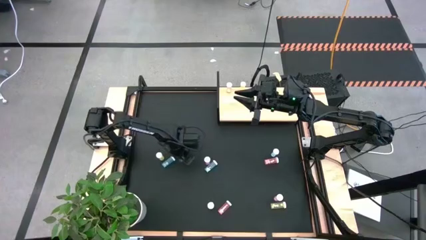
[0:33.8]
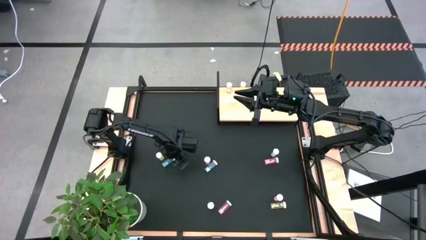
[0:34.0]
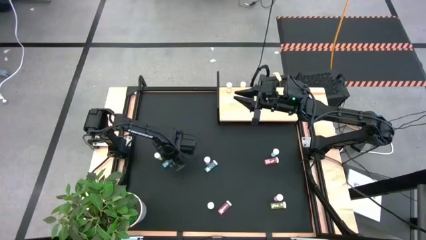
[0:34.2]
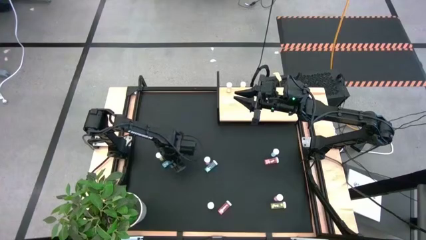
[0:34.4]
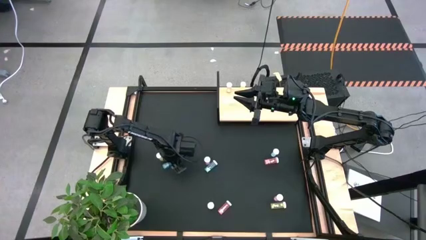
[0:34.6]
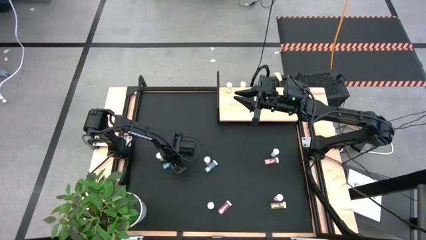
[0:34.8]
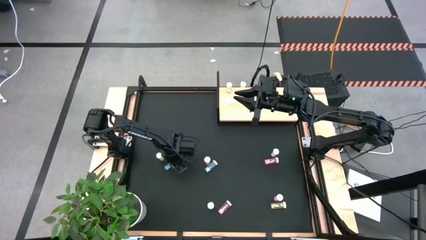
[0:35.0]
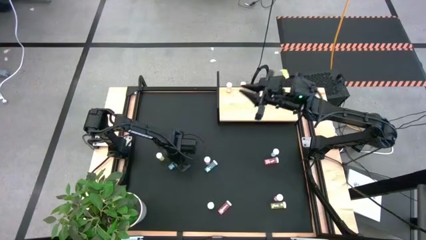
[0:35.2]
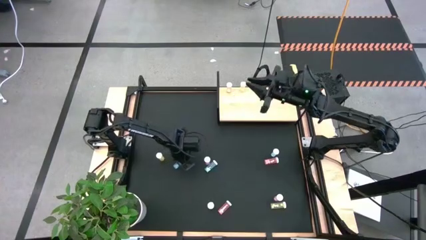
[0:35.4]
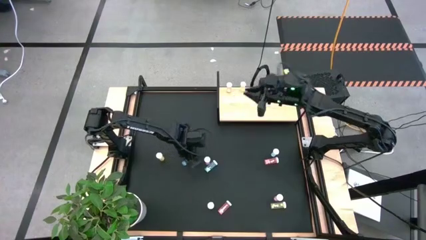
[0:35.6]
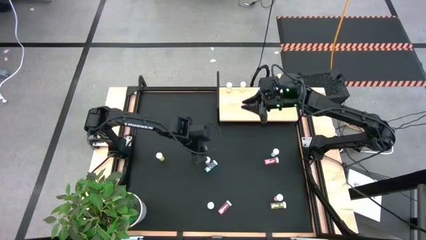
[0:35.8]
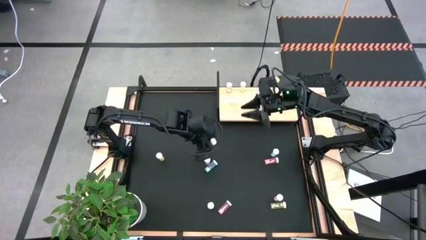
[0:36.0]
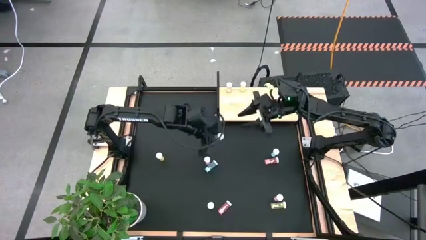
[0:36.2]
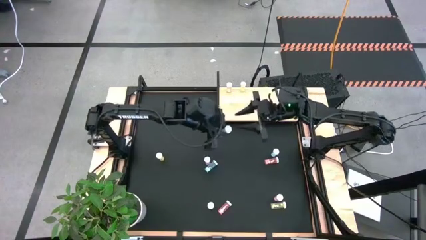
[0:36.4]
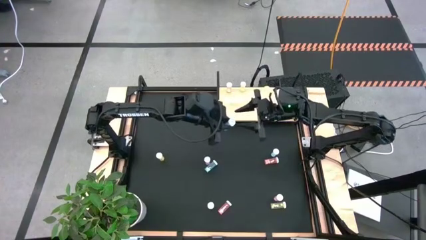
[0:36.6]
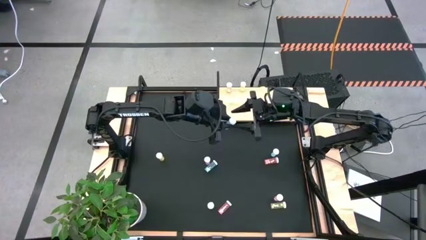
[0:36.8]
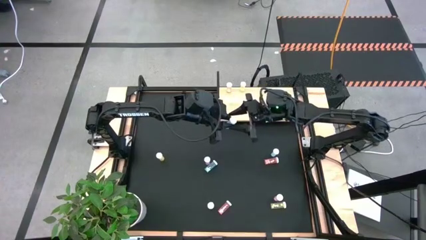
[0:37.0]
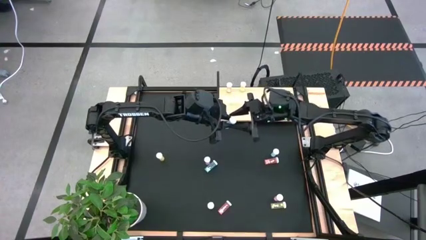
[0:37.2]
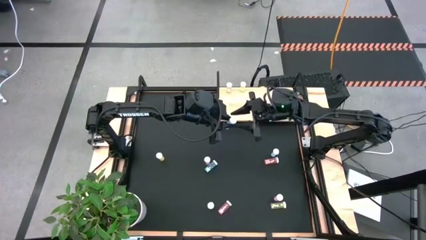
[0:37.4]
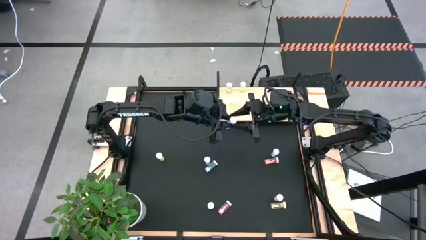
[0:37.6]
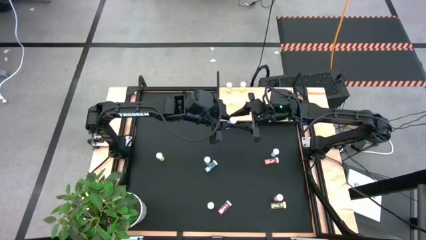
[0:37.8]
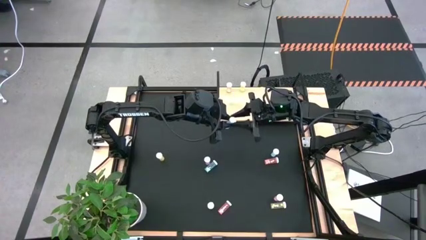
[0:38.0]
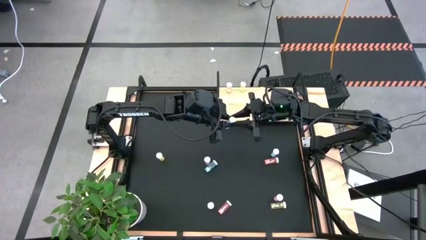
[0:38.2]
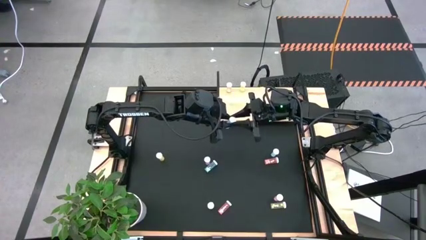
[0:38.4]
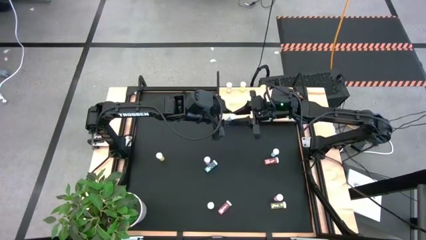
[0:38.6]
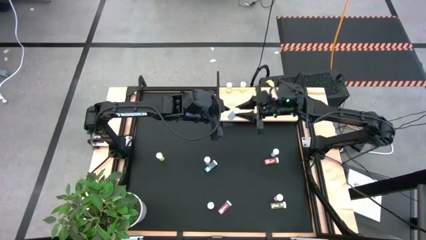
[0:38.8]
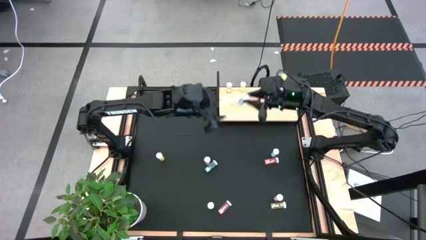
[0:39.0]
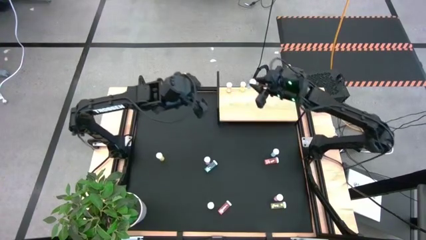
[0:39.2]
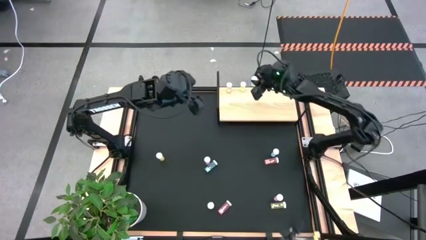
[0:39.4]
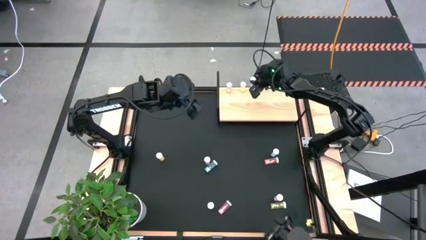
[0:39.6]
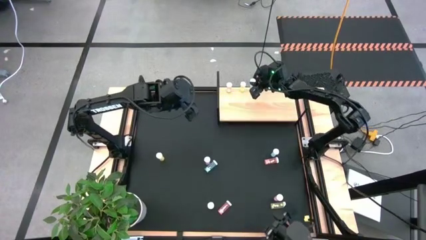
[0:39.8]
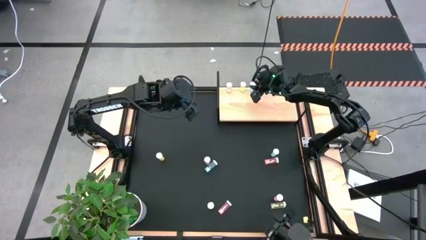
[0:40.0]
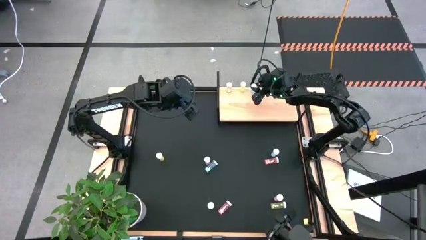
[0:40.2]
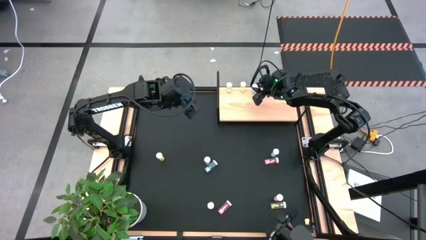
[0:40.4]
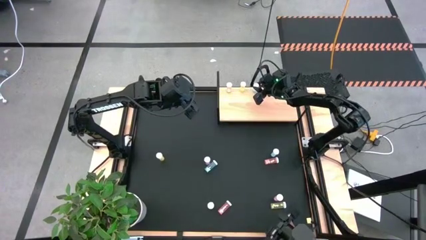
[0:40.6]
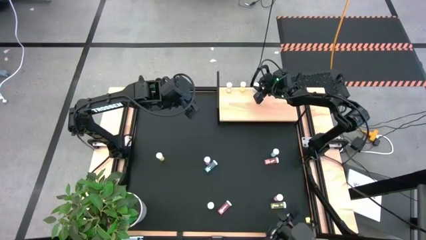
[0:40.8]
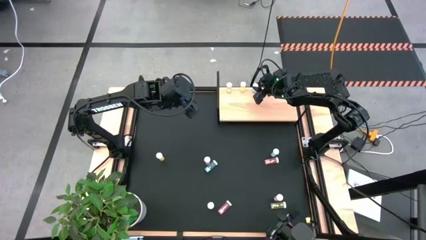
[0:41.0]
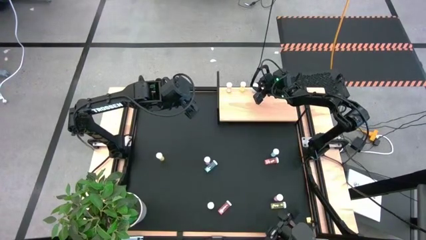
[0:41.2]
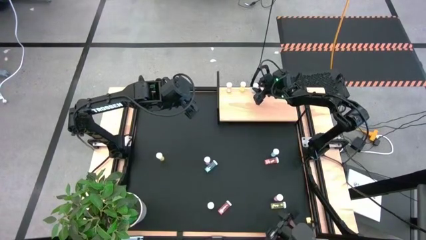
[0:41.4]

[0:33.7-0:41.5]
Task: Pick and place medicine bottles onto shelf by color
Put the left blue pill bottle on the shelf

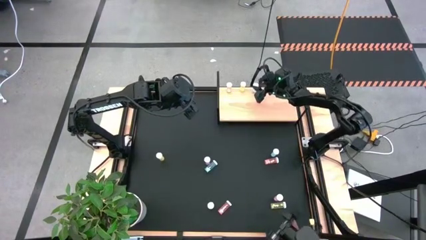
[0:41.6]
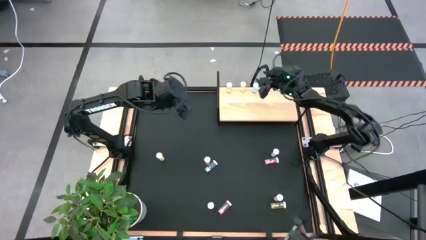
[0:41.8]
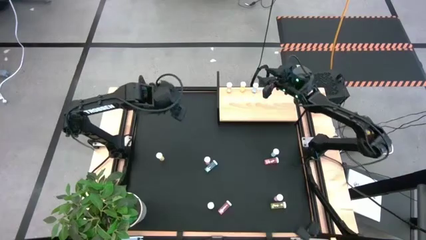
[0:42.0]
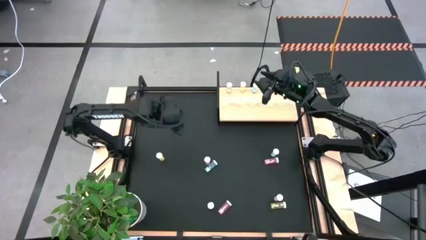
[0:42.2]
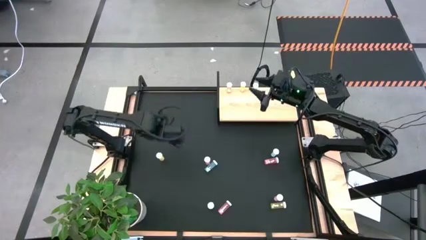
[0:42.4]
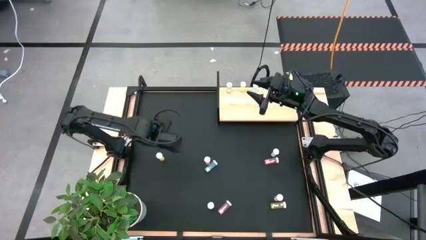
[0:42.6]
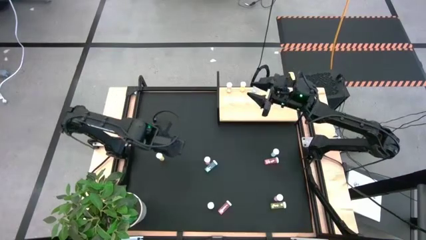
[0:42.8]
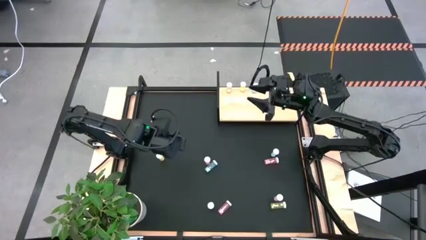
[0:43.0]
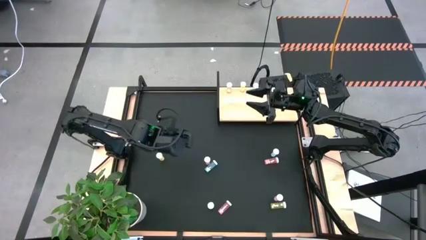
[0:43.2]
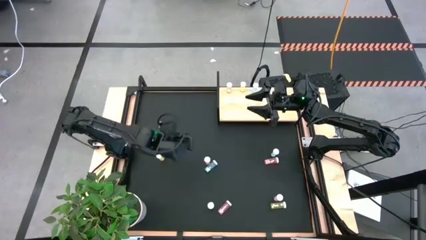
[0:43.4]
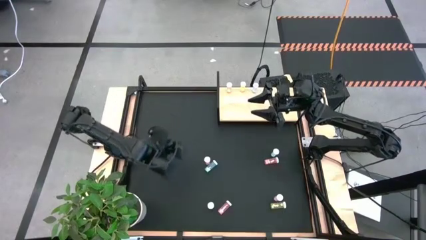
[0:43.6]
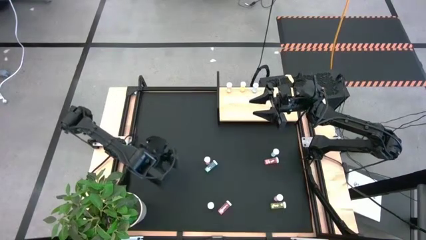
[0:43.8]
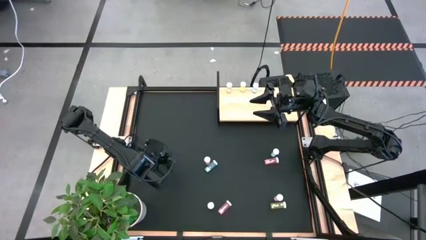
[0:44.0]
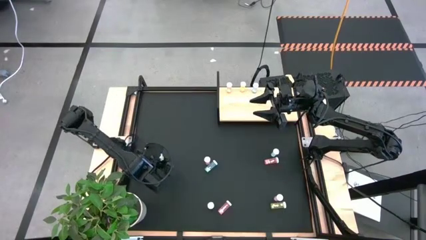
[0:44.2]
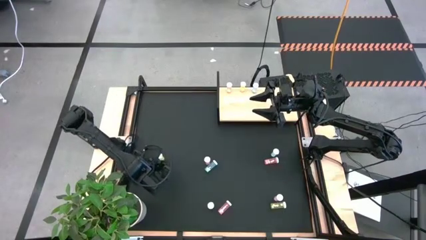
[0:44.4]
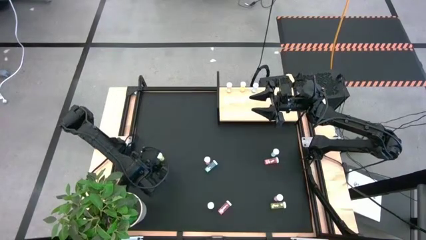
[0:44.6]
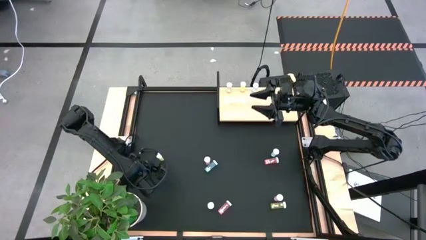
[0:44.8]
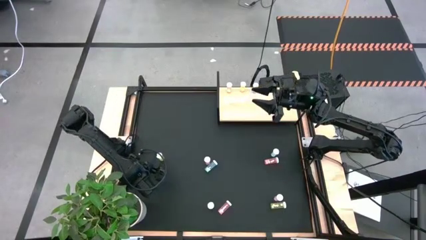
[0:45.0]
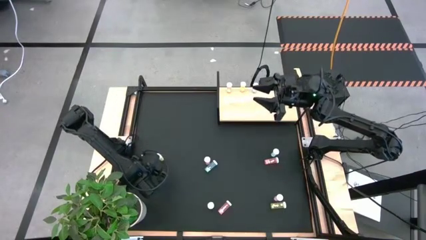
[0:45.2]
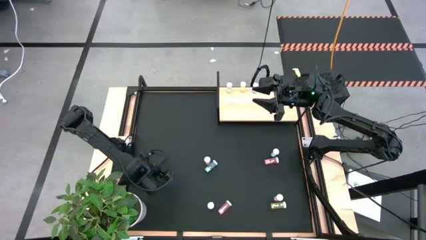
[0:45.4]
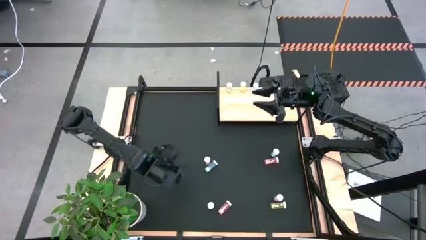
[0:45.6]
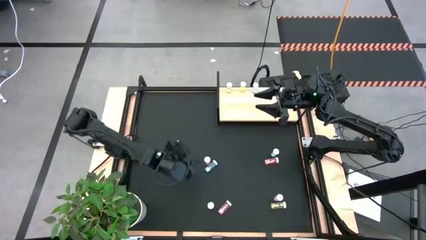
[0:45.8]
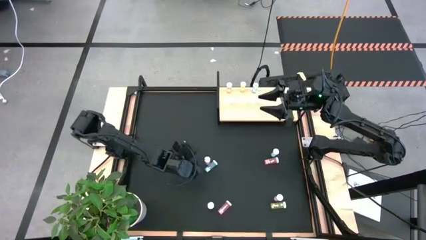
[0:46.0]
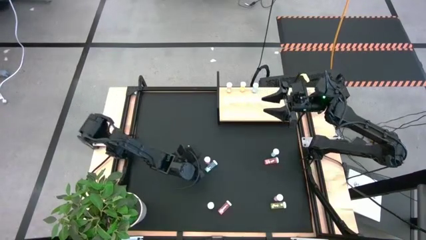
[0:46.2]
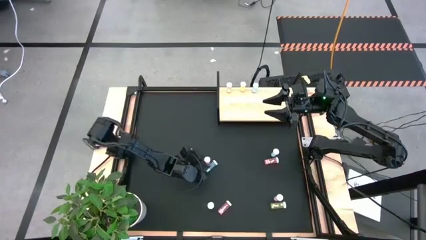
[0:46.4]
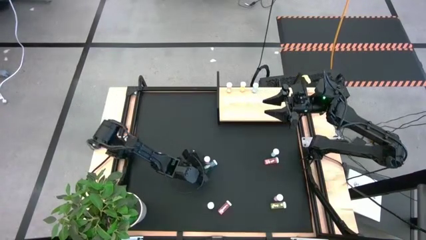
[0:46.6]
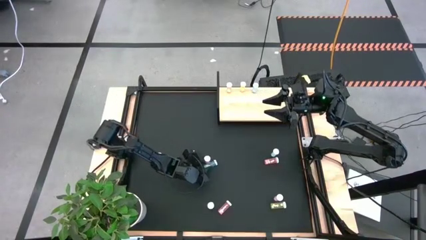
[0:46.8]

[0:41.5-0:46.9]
Put the top purple pill bottle on the shelf
